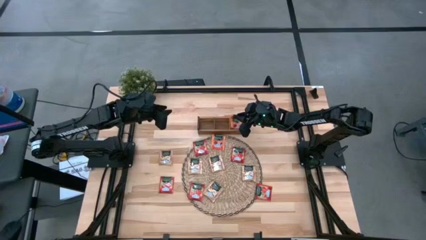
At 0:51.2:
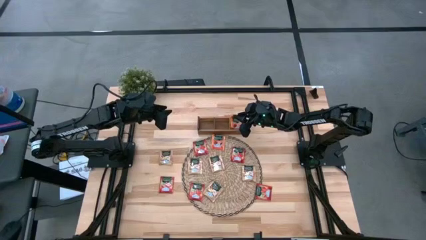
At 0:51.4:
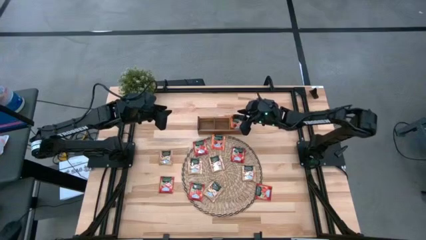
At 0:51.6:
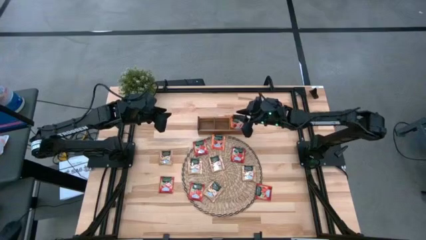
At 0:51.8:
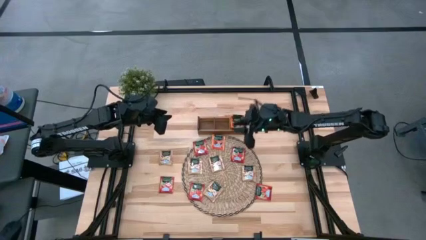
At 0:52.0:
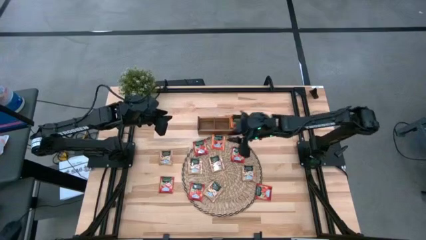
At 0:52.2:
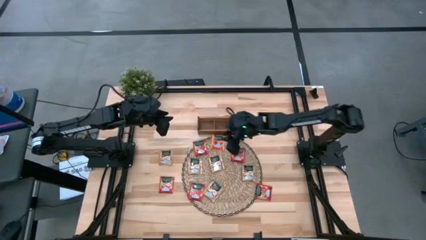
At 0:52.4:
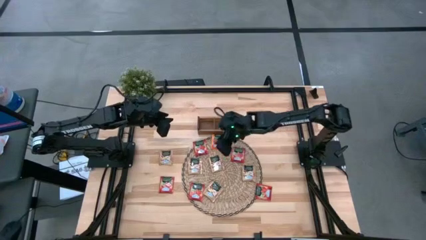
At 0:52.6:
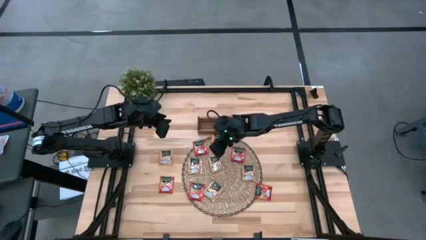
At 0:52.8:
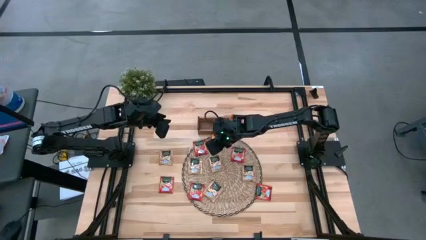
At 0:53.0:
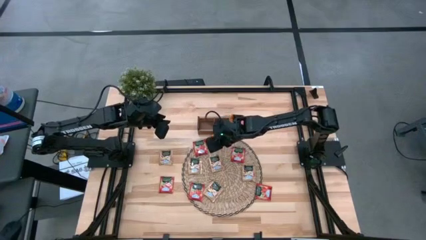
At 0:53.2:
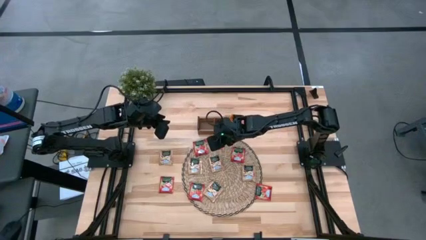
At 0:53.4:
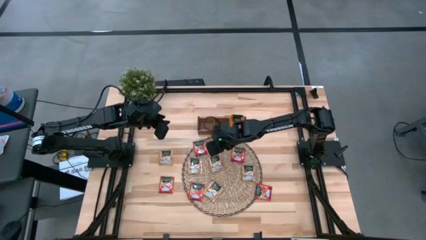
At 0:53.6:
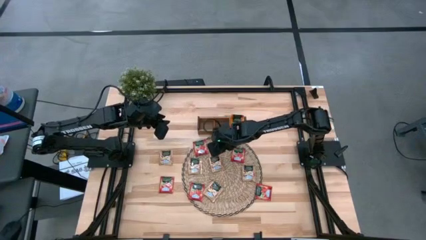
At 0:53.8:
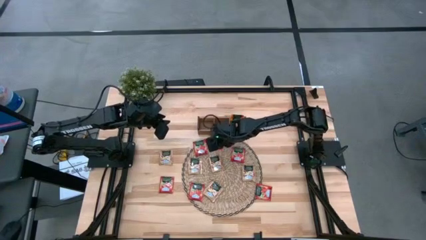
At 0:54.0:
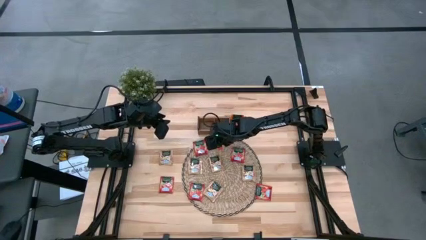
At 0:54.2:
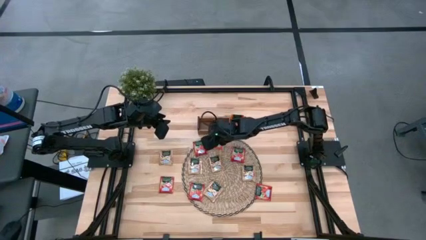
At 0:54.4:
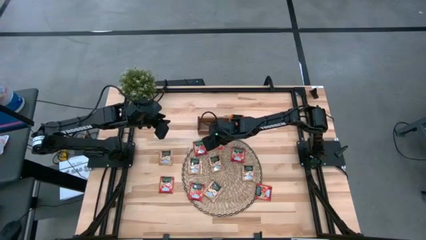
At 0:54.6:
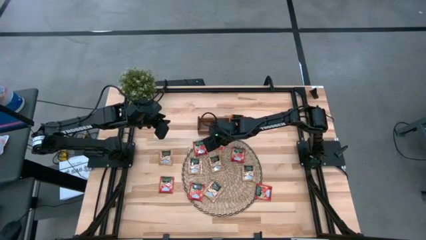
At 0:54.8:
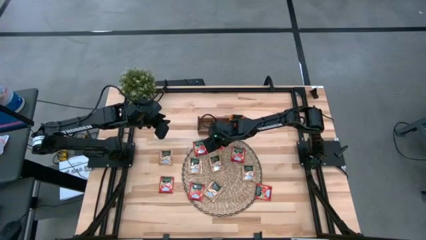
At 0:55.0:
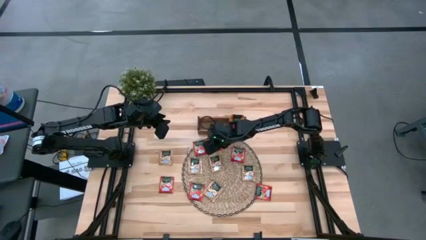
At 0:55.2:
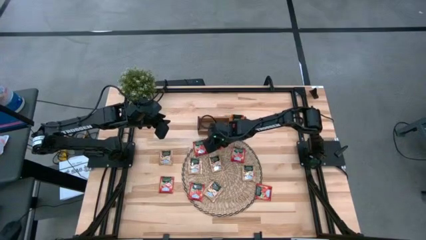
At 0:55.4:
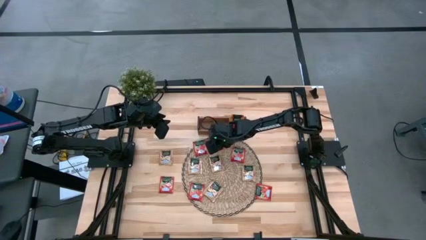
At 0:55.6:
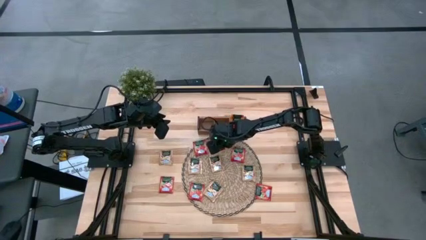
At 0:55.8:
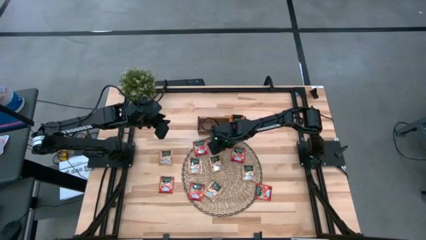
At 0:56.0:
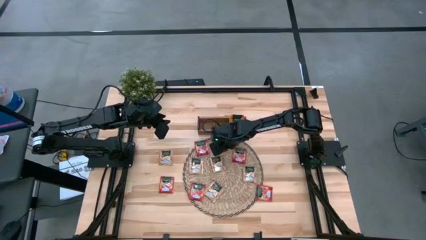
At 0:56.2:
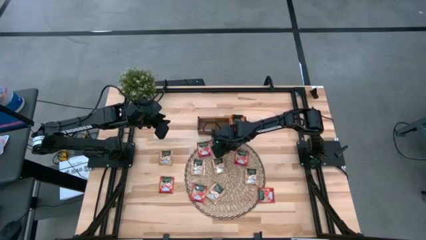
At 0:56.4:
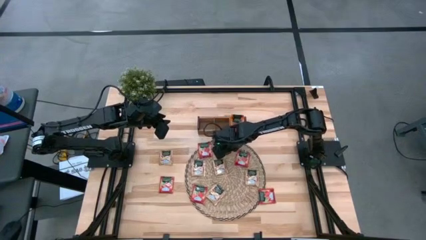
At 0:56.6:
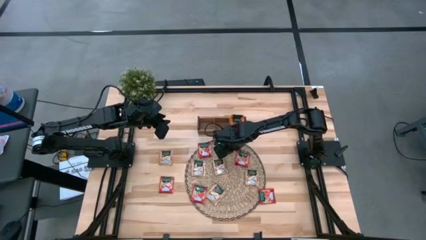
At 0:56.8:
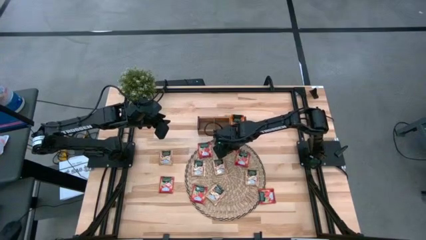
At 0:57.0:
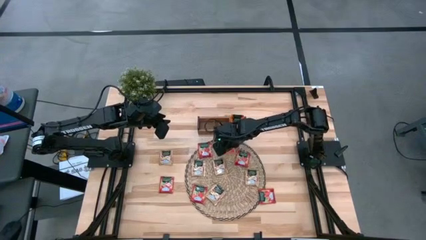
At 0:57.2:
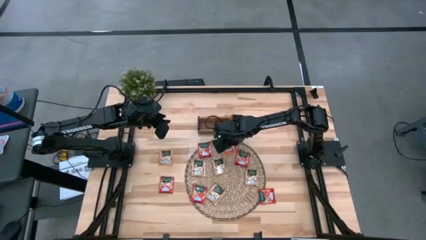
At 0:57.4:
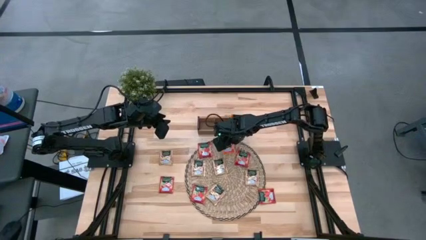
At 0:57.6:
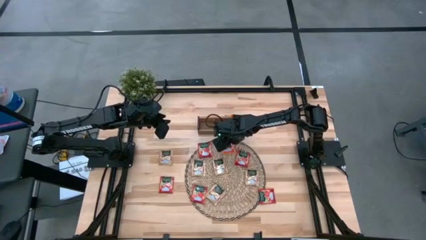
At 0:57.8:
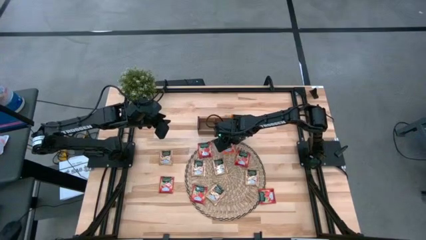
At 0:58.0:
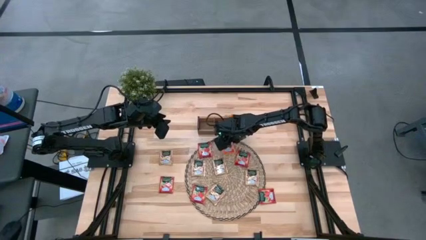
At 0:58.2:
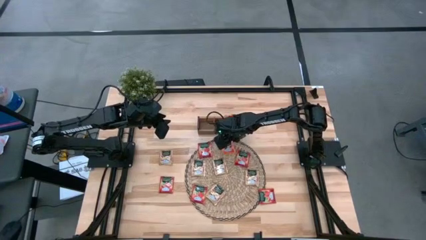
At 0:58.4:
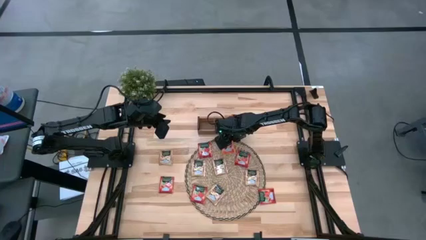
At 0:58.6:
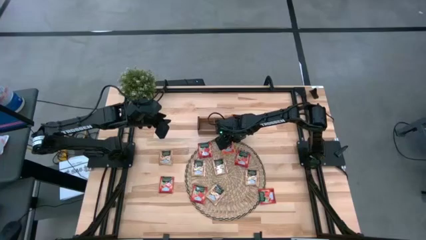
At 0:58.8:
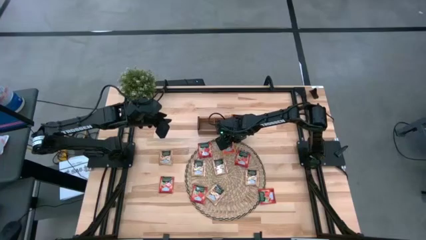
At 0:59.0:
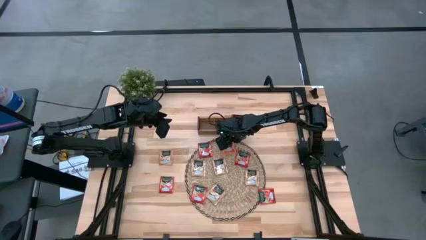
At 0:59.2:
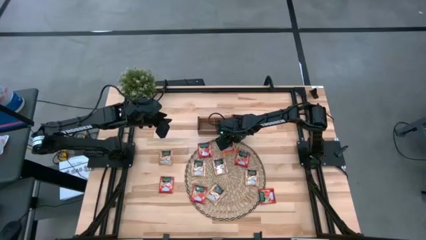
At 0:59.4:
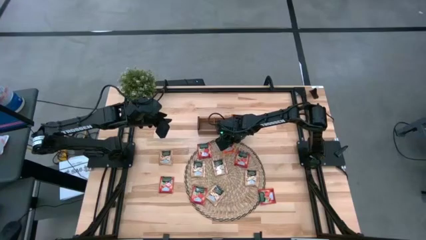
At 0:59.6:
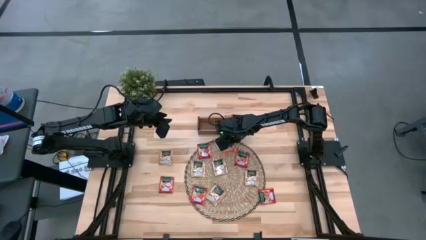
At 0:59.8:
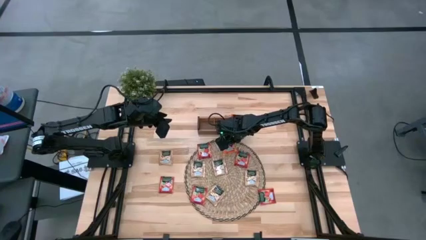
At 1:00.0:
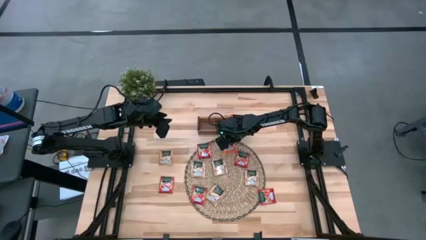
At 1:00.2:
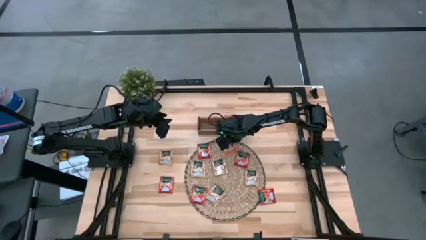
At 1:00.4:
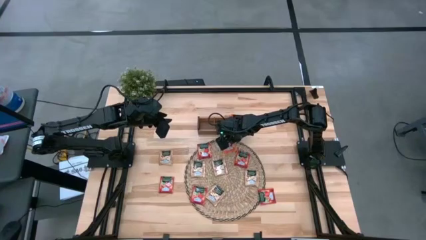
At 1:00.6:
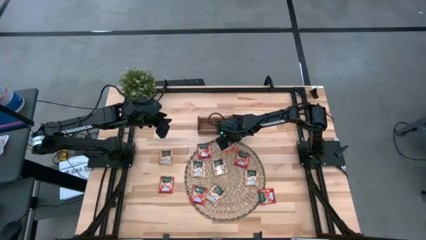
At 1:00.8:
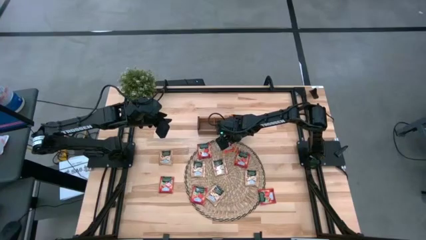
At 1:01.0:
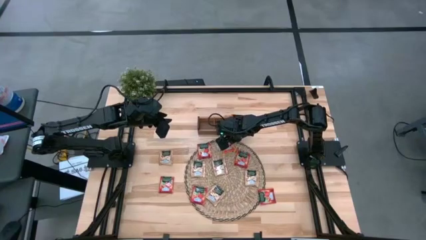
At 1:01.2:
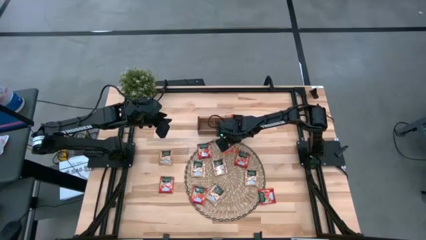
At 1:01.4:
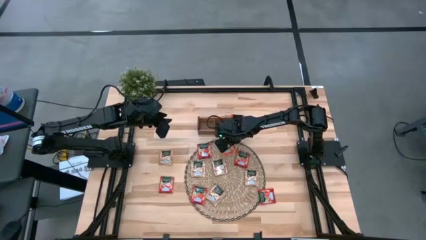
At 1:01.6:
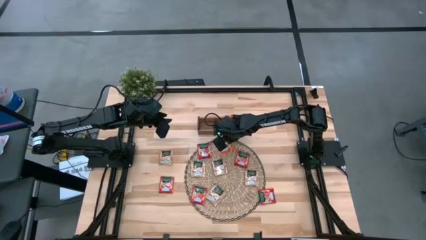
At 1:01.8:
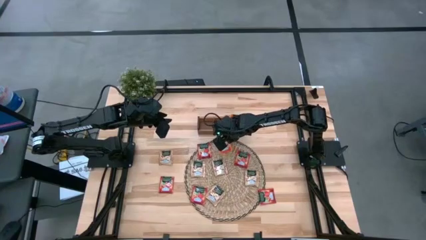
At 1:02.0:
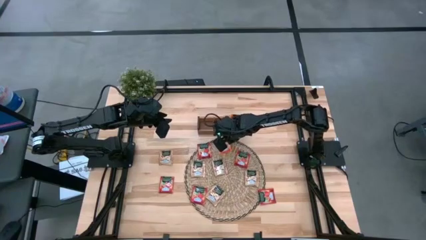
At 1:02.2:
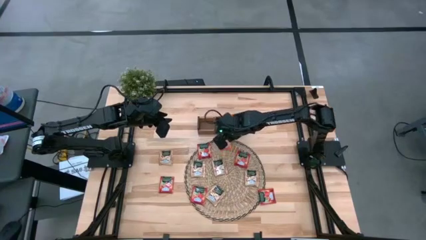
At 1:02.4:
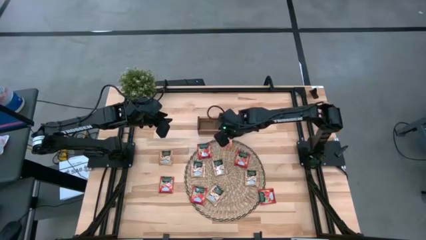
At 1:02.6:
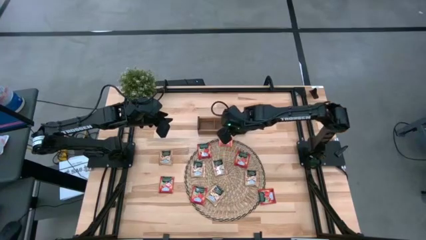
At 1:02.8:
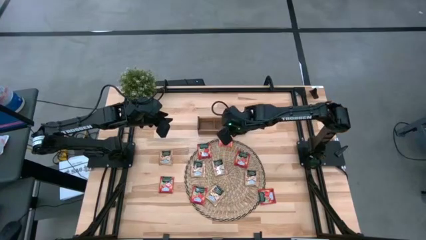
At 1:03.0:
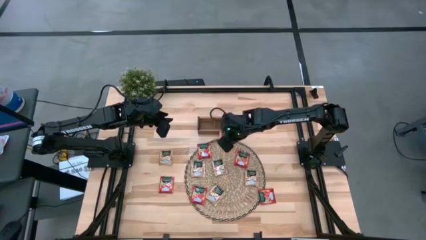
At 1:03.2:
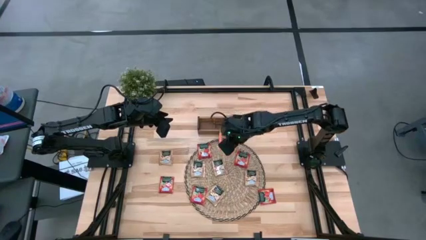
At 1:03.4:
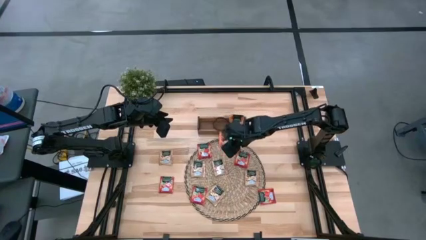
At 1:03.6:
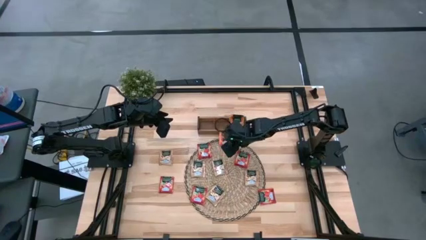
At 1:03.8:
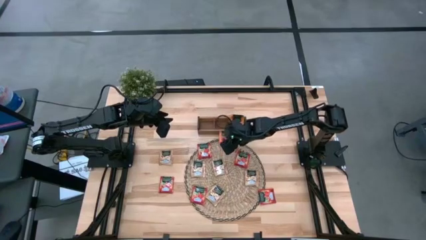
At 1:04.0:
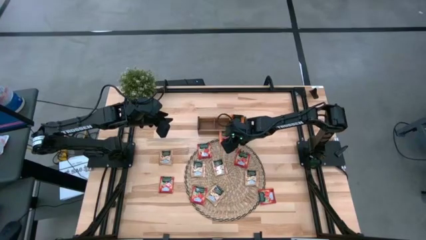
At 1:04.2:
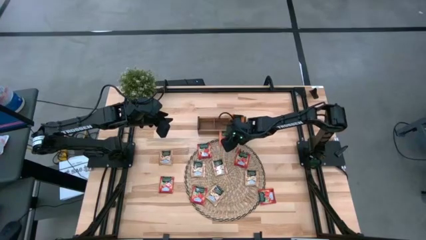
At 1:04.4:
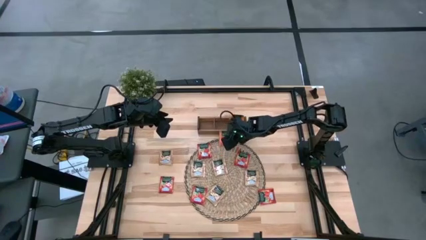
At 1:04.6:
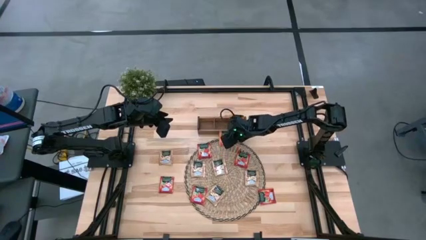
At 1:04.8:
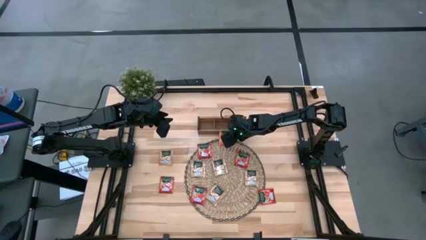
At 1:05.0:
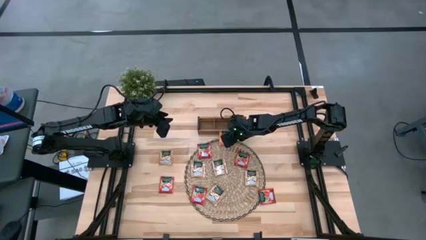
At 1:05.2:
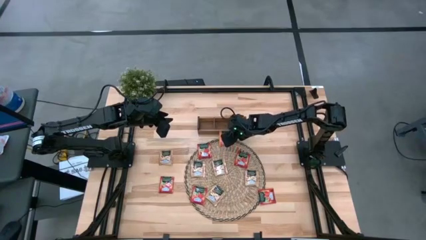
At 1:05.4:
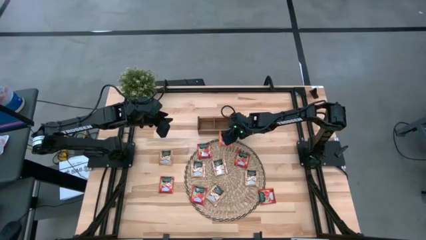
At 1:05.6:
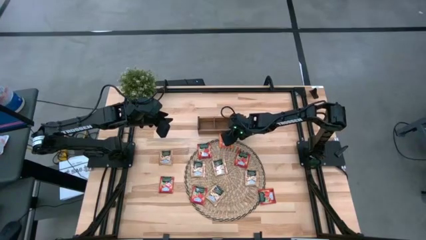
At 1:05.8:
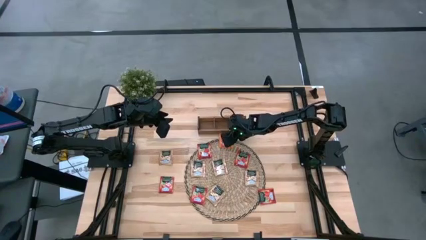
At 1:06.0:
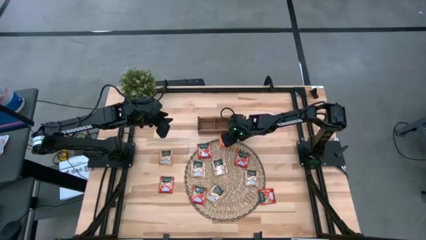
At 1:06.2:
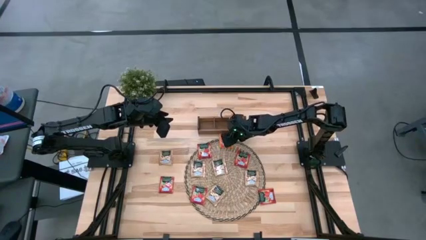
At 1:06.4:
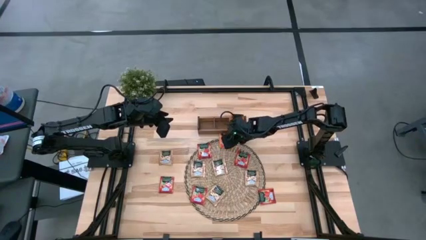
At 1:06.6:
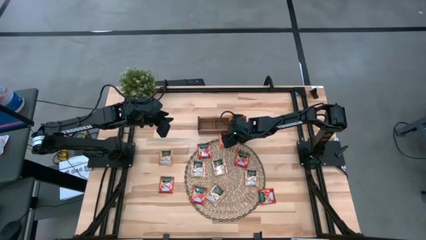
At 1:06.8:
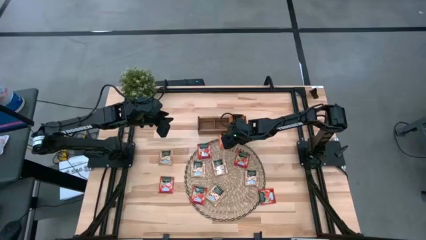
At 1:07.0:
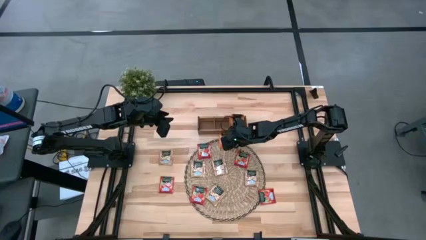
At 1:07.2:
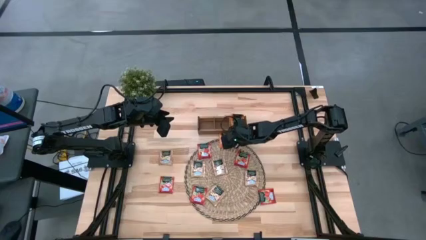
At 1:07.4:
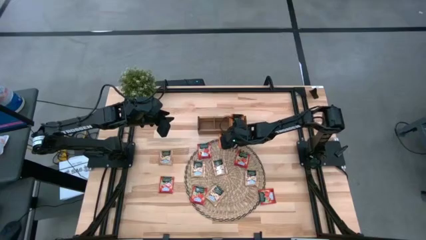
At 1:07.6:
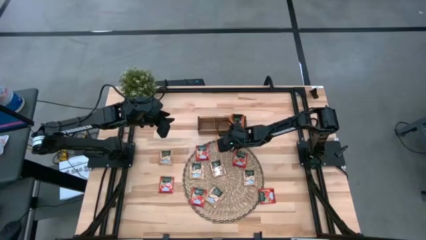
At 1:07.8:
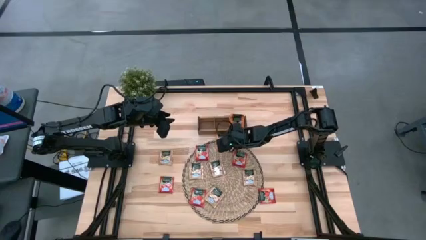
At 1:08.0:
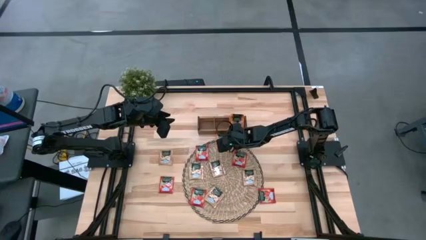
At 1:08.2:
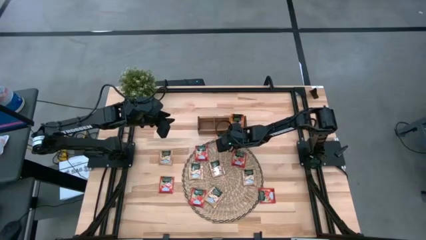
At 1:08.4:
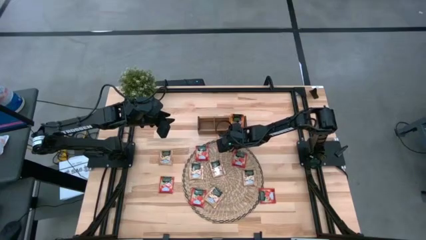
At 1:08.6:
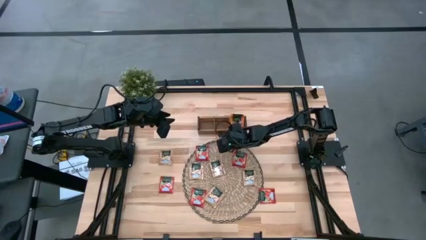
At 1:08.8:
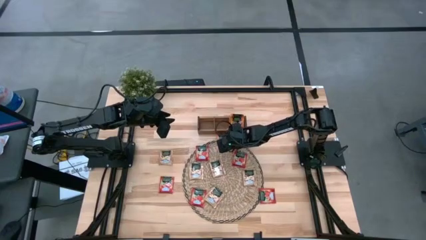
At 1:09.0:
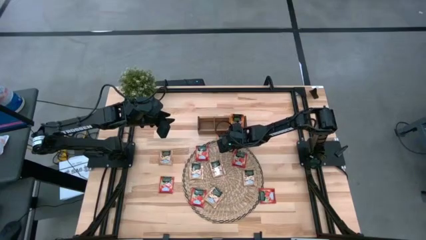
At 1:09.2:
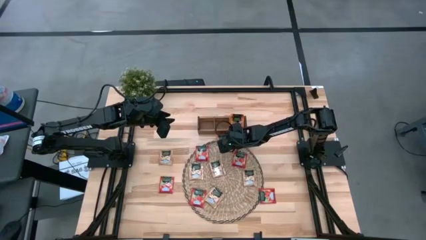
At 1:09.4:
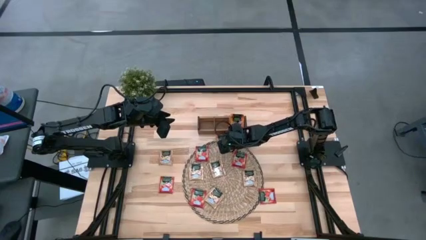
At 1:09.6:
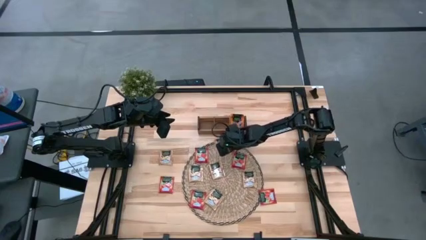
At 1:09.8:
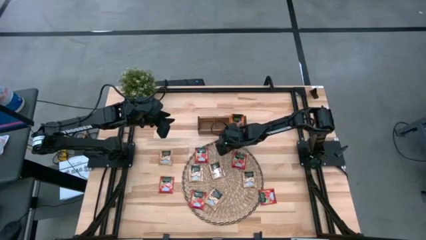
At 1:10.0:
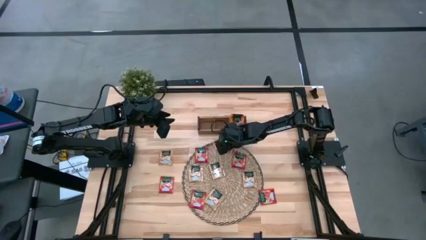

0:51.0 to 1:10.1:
Task: Pick & Place Tea
Put the orange tea bag to the right of the wooden organizer
